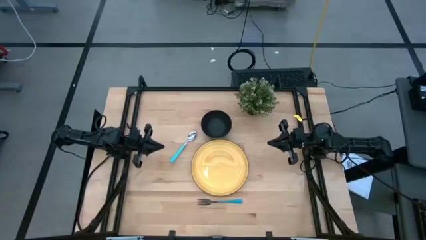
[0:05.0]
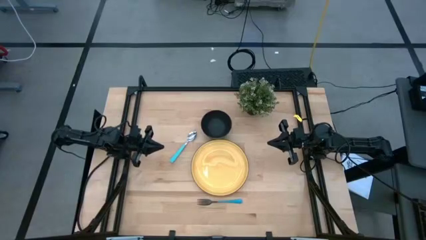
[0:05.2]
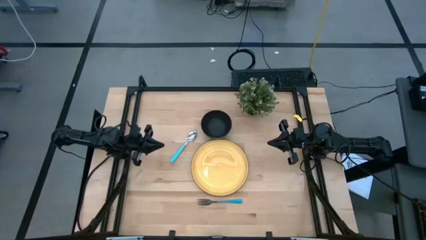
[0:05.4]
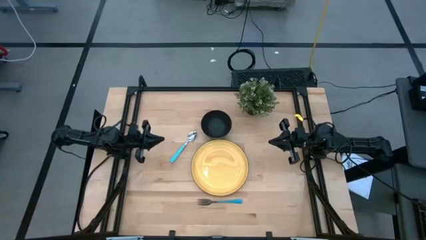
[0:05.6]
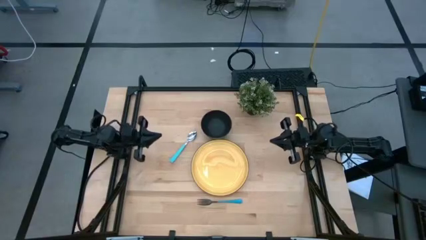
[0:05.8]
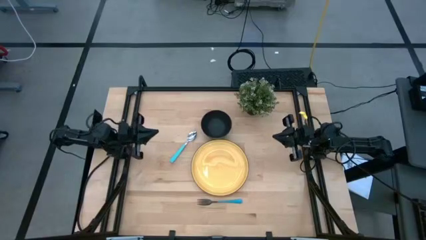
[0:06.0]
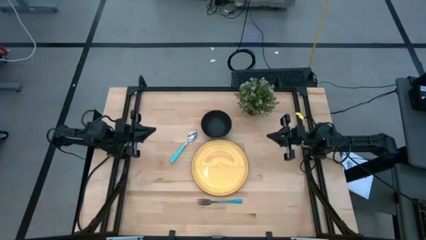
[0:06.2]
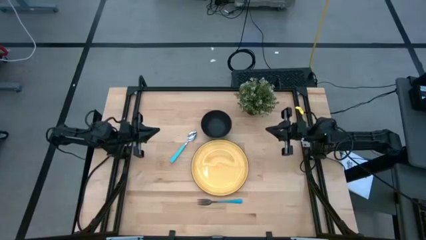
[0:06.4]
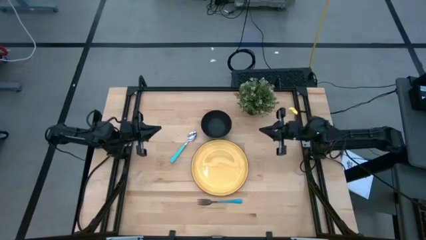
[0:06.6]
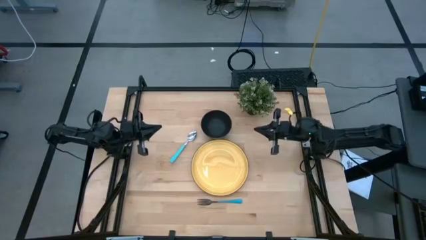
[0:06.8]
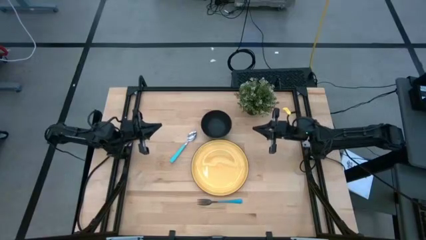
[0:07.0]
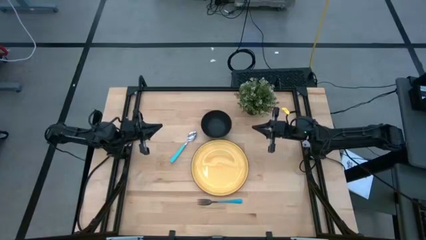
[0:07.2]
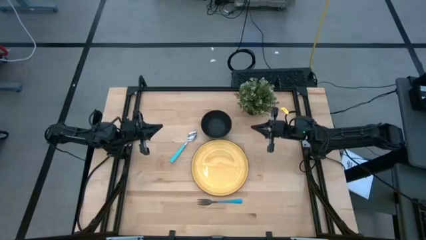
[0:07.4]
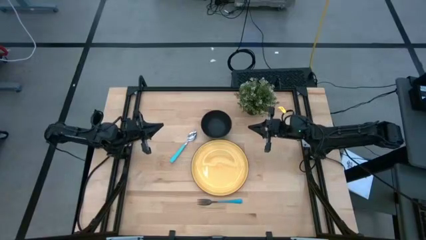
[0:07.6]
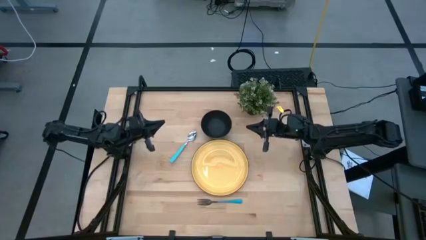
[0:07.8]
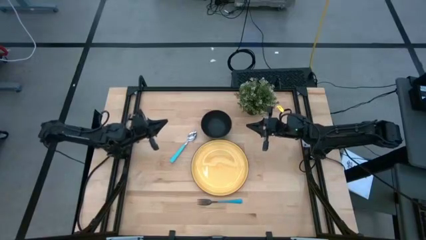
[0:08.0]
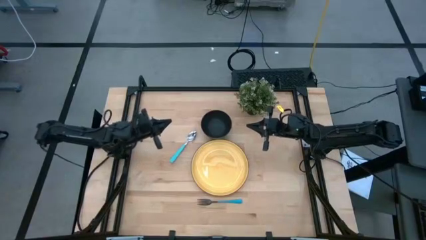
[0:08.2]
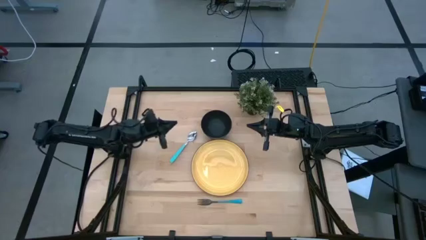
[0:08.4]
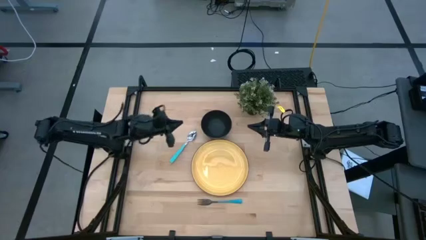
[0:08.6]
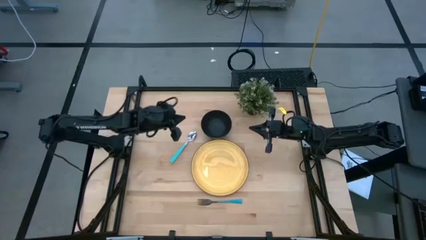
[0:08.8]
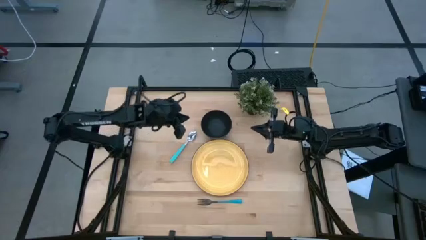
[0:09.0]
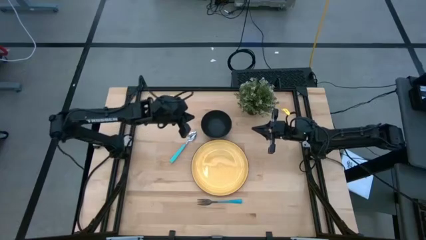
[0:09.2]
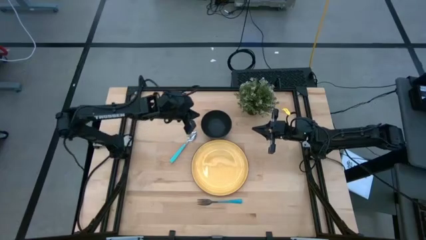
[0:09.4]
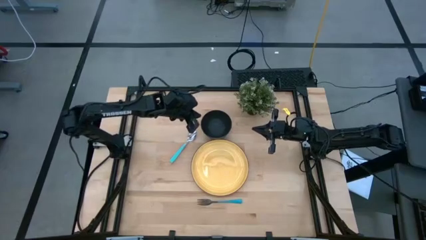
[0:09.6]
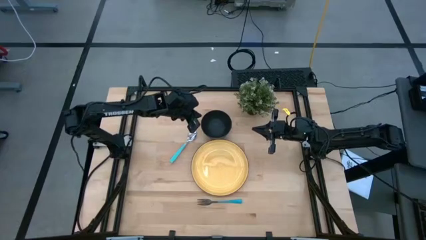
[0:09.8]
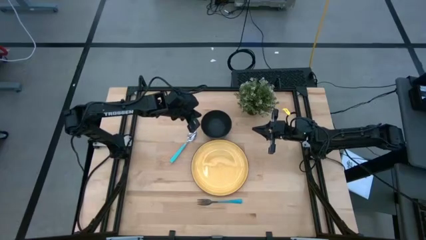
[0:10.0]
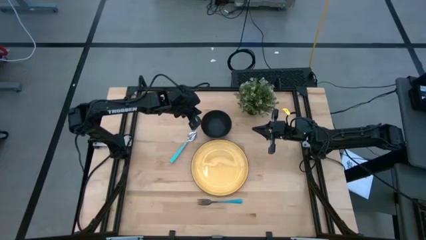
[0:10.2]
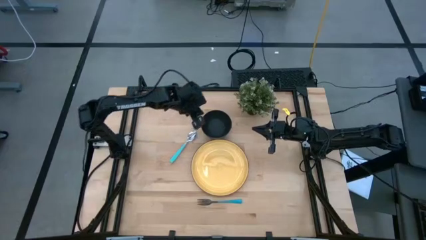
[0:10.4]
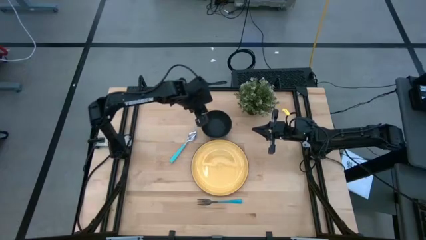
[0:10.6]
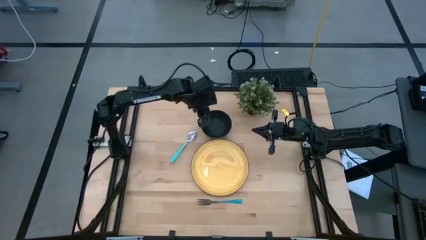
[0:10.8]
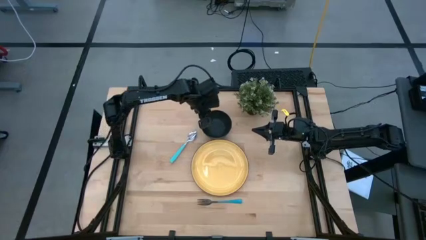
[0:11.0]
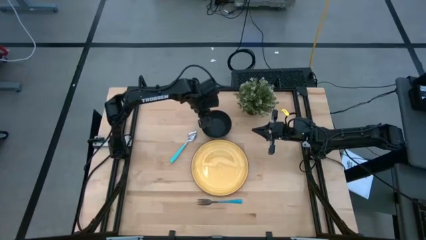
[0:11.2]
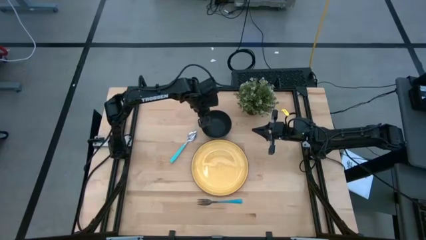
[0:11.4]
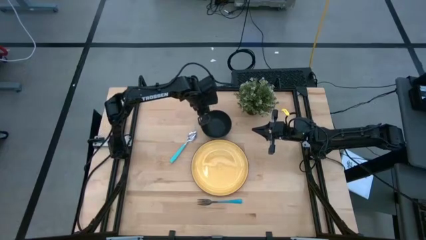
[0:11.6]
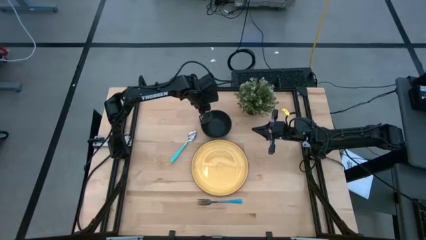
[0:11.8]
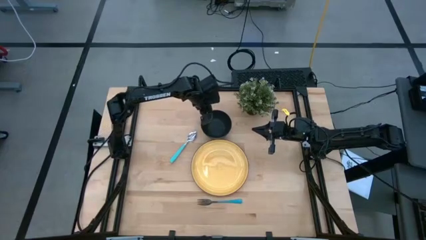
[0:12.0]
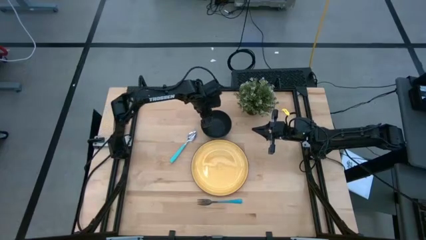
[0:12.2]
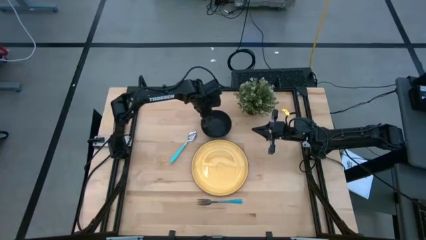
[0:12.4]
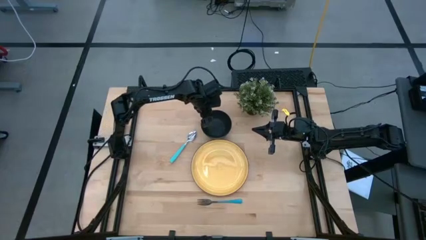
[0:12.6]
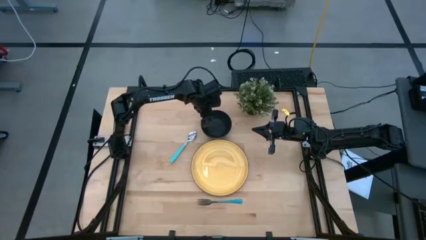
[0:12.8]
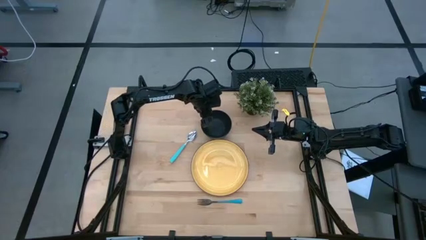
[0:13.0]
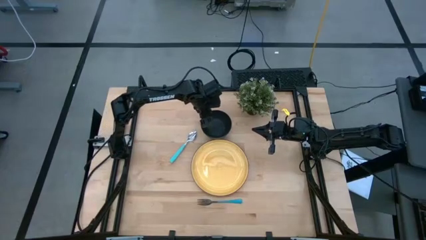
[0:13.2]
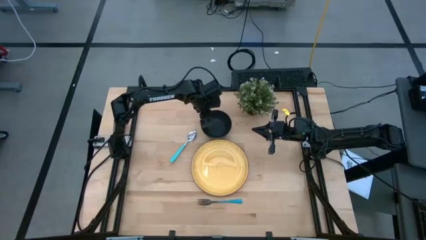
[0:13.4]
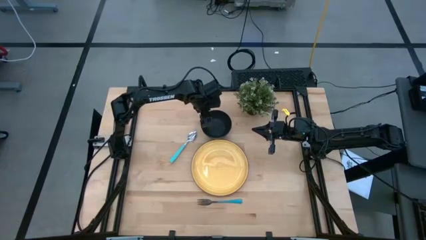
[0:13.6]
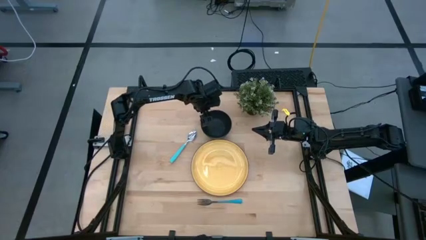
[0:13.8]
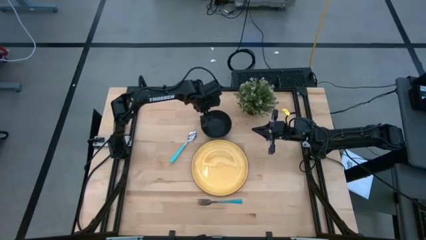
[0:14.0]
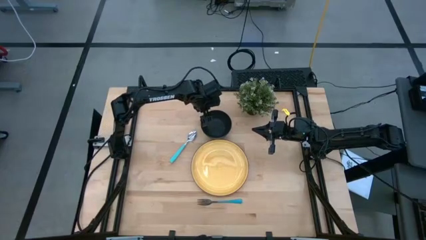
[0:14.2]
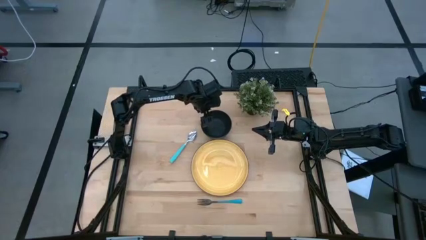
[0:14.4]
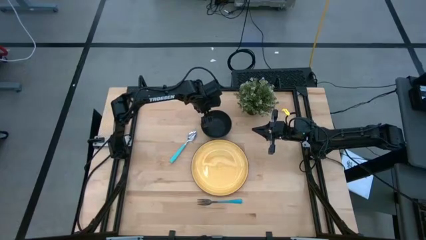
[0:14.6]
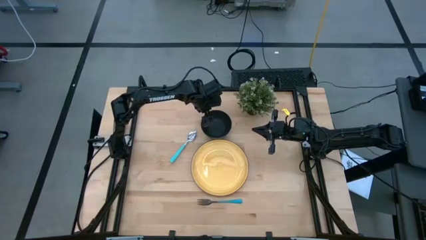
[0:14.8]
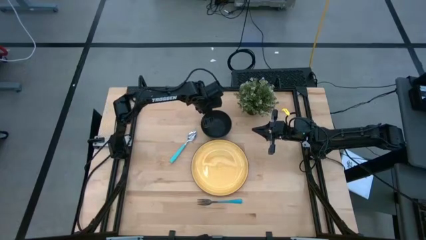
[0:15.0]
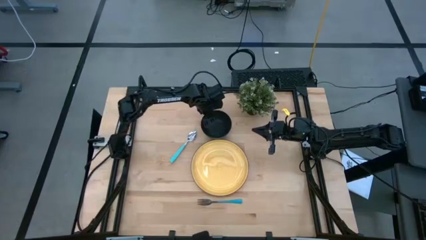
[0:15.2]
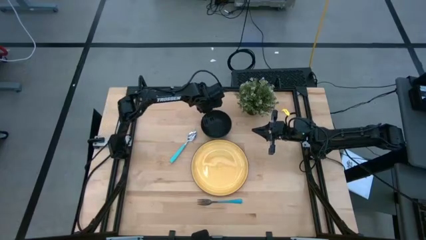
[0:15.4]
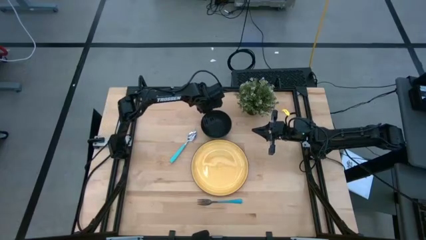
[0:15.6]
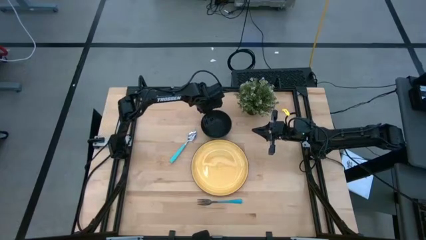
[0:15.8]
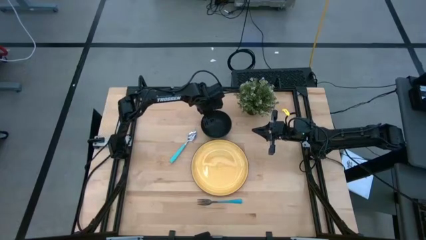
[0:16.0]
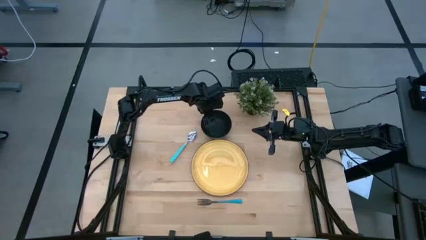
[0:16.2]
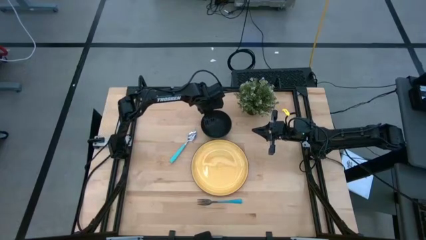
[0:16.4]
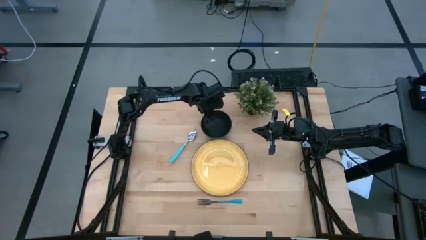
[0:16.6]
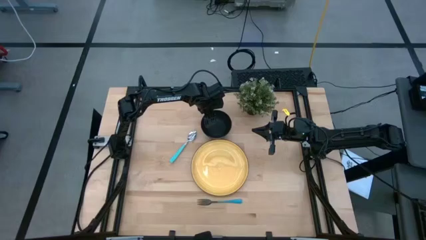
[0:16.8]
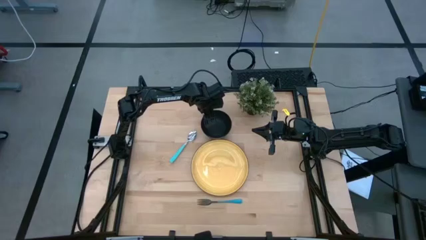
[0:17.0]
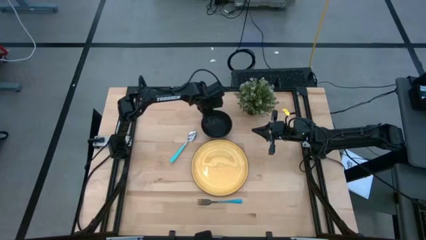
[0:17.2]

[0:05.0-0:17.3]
Task: Set table place
Put the black bowl on the yellow plate
